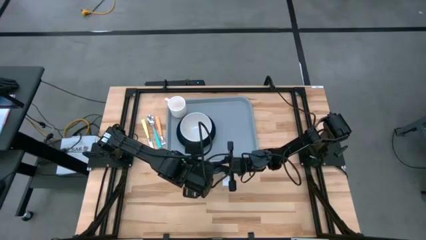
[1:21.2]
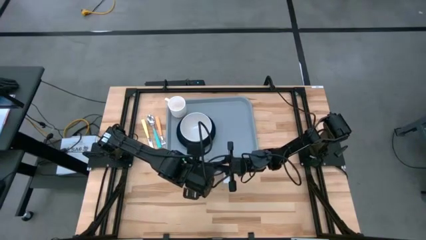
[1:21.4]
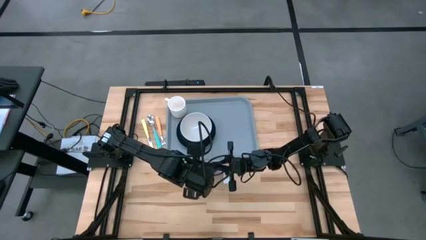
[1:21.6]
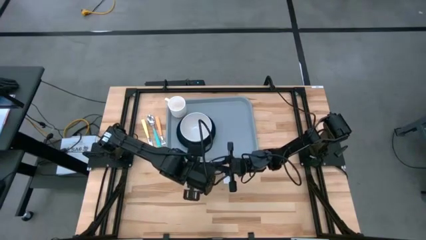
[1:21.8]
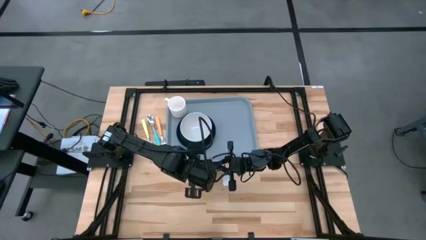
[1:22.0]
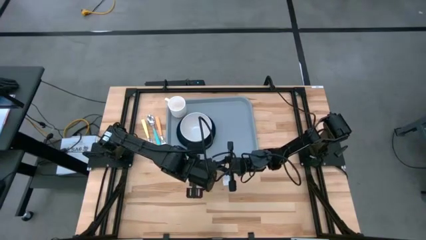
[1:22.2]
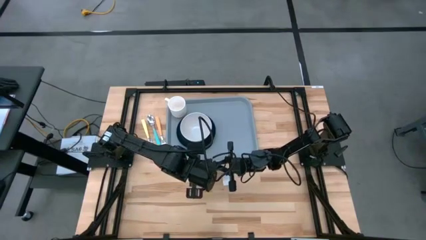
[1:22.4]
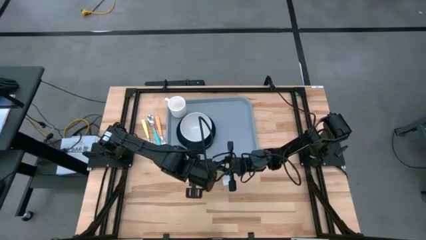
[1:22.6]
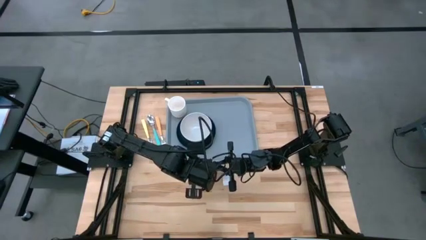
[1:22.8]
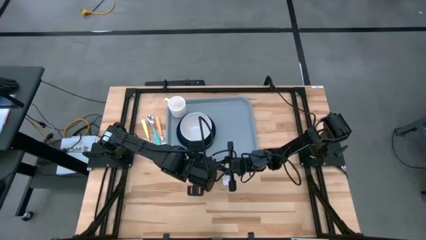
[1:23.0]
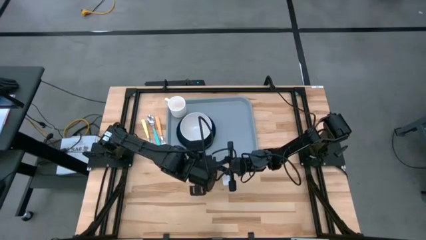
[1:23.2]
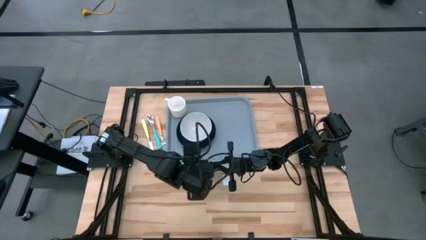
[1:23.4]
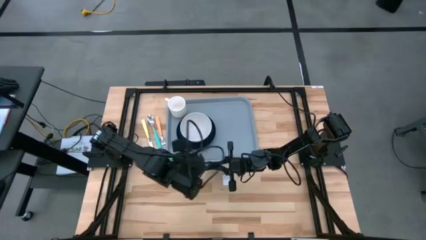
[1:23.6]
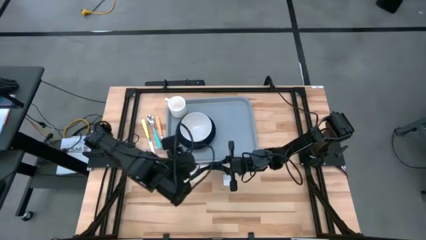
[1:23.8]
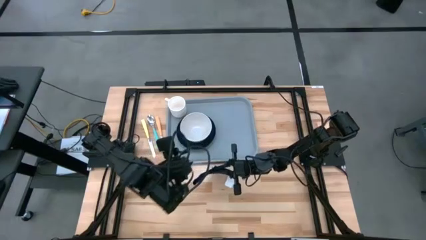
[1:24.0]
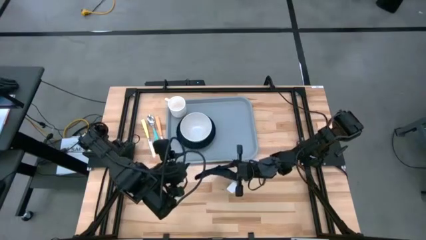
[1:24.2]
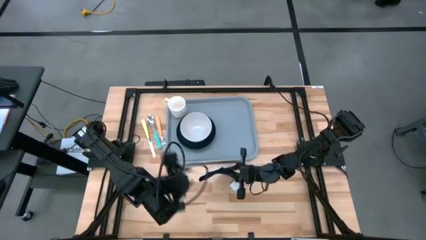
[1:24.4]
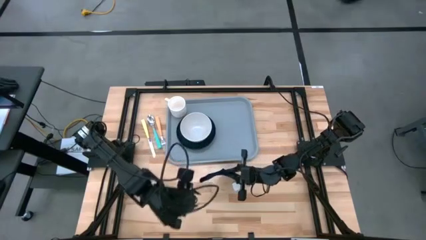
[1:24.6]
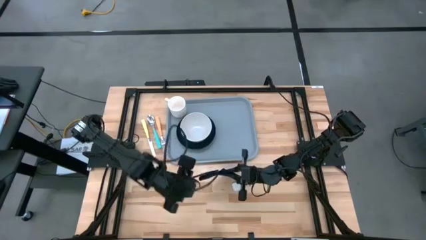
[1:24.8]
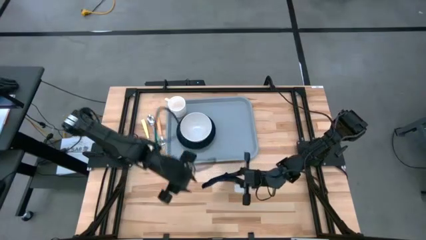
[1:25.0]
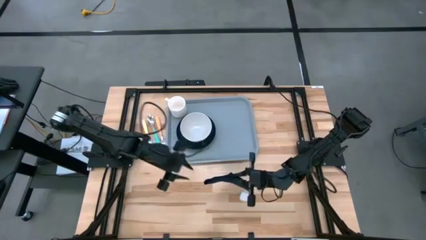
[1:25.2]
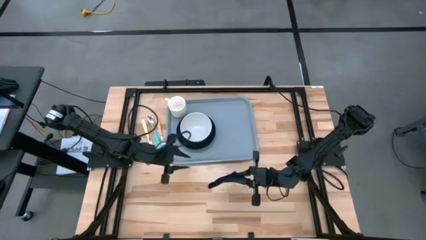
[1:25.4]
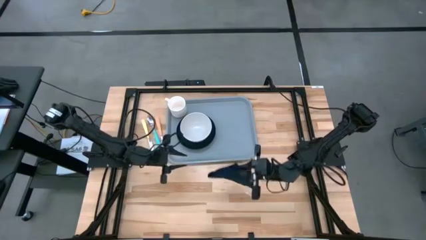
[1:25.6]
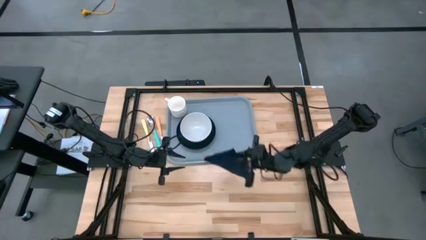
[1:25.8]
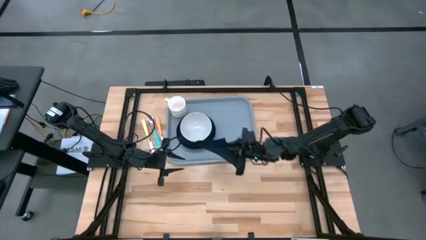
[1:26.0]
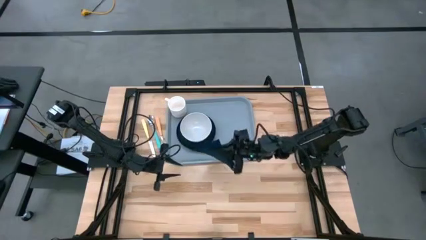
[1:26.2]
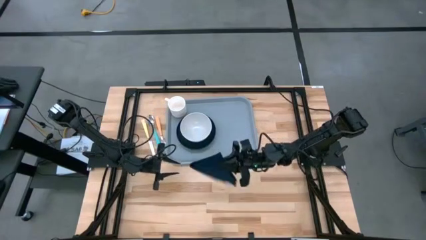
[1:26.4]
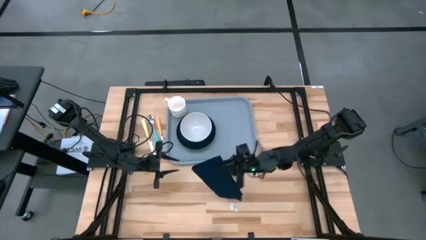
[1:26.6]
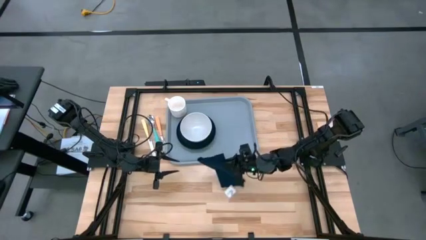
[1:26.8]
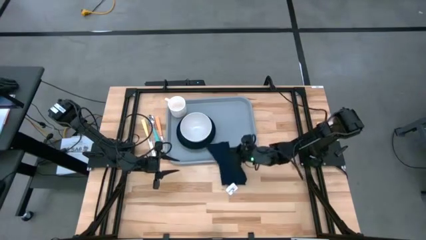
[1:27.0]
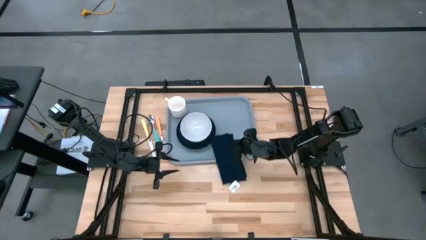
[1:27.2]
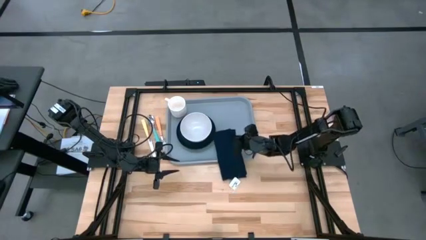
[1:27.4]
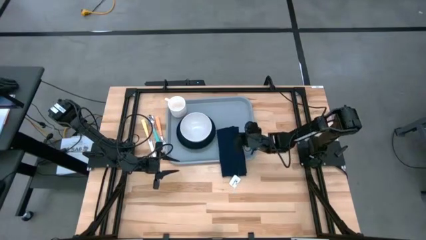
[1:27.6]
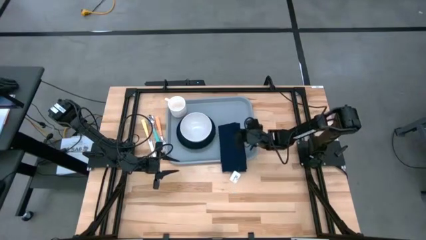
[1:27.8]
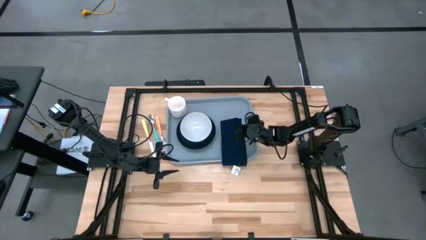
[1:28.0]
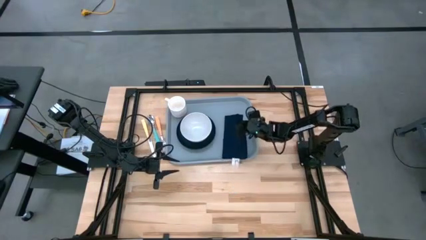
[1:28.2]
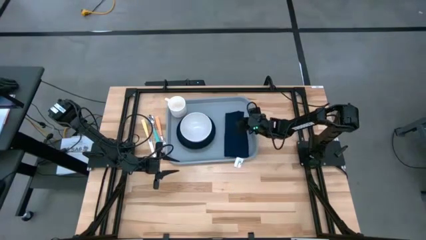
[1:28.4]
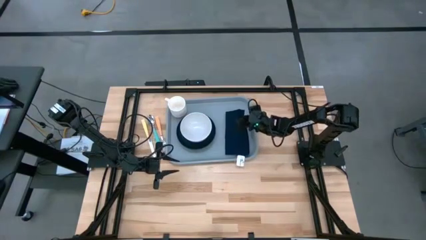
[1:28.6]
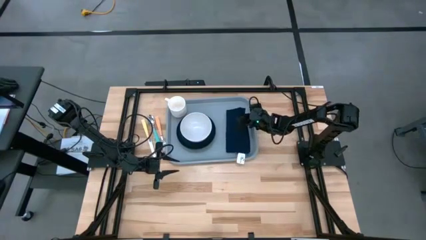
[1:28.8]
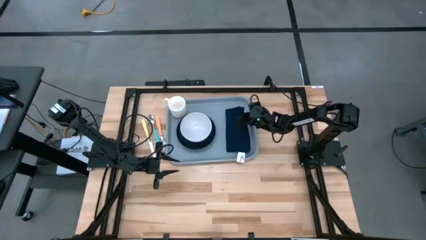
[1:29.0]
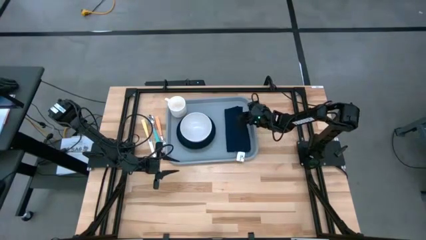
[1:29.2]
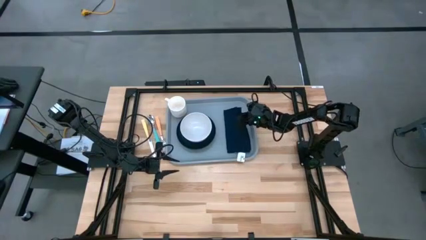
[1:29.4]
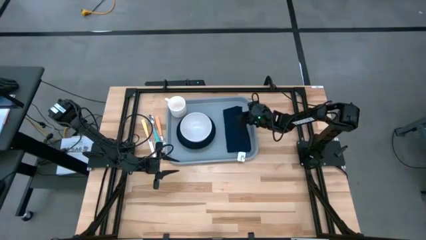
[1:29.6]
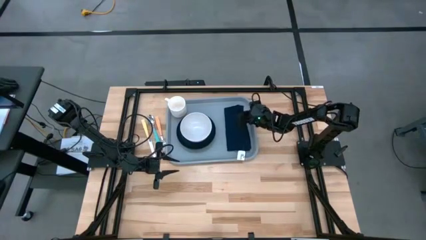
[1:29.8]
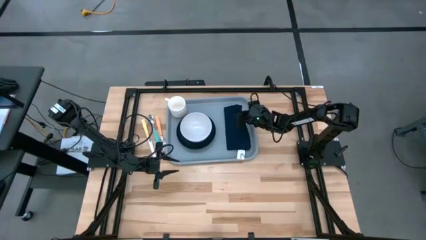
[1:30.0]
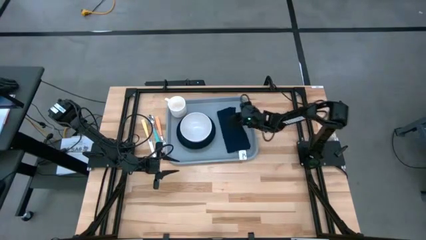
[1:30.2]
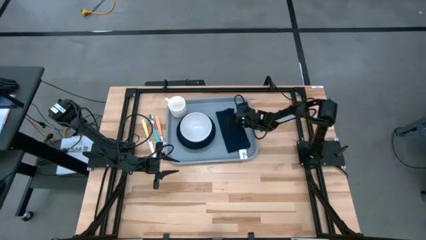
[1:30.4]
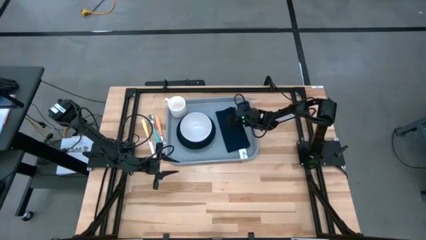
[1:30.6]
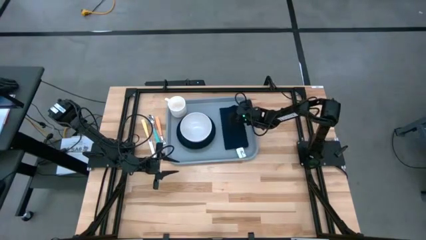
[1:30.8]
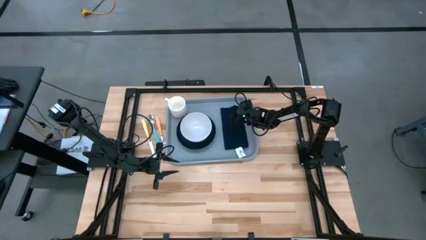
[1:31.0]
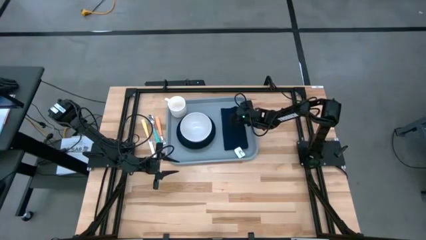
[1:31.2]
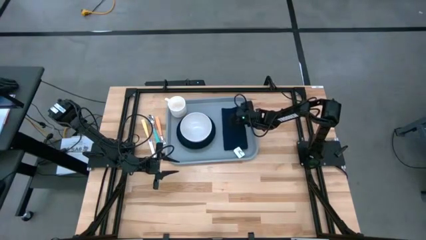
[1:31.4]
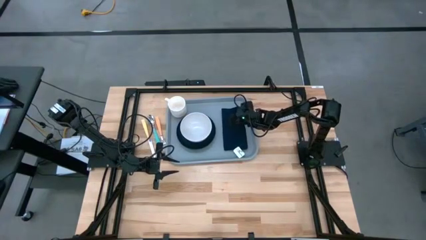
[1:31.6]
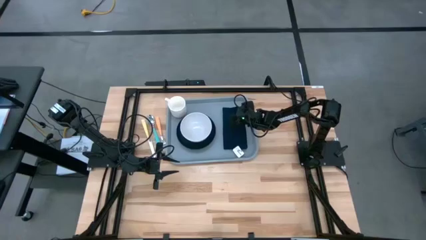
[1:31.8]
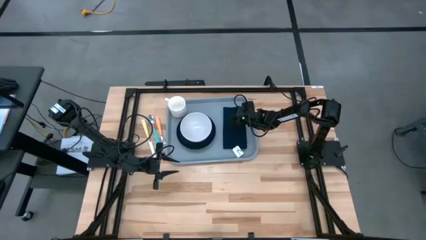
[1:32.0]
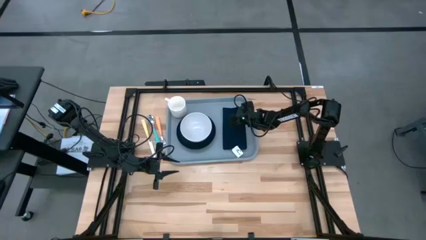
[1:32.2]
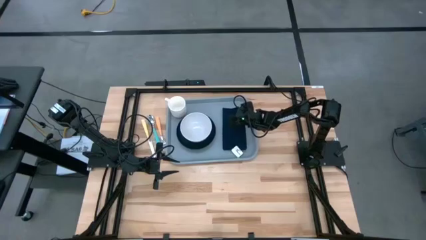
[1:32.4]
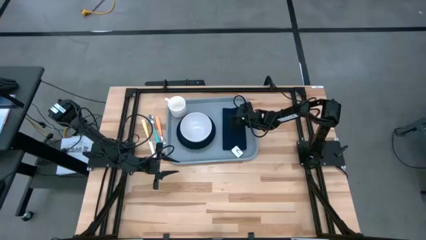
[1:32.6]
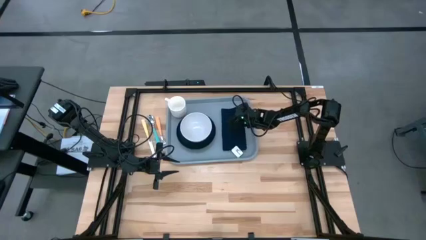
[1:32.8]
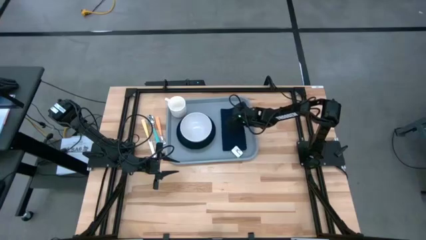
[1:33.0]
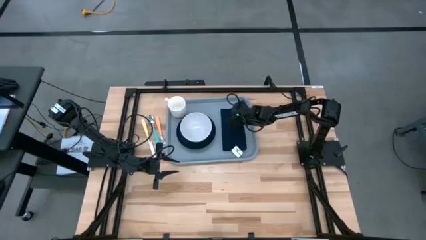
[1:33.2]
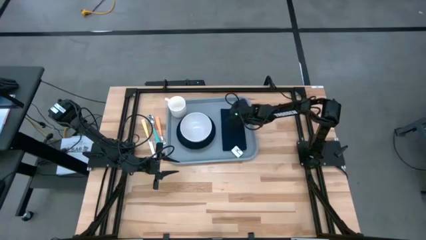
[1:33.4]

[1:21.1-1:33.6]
Task: Set up tray
Put the black napkin on the gray tray to the right of the black plate
